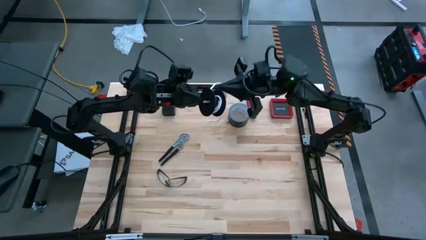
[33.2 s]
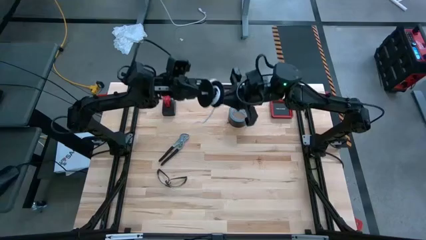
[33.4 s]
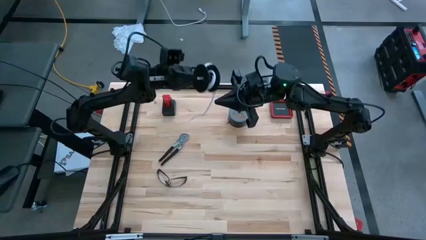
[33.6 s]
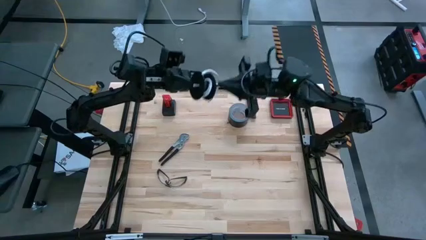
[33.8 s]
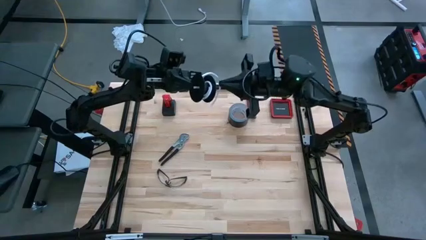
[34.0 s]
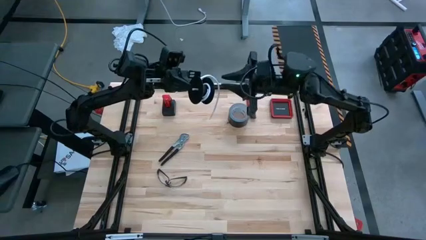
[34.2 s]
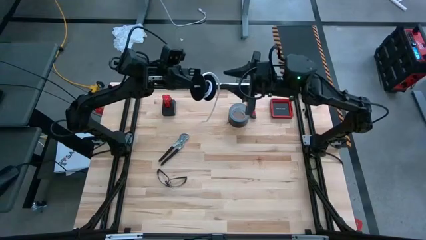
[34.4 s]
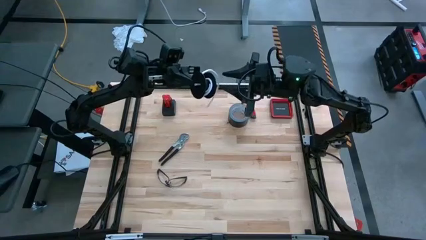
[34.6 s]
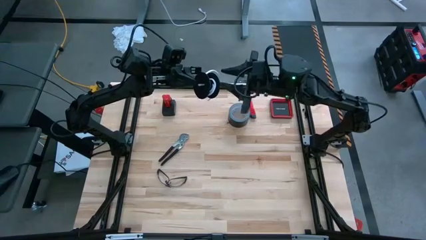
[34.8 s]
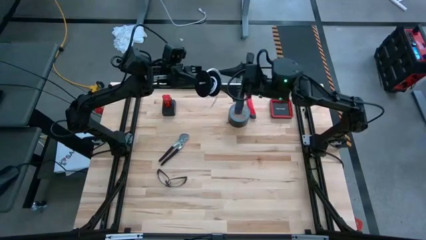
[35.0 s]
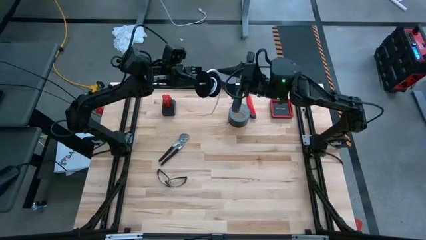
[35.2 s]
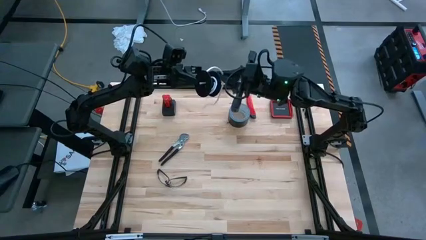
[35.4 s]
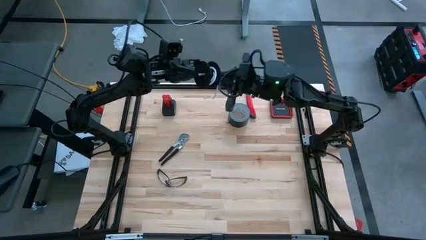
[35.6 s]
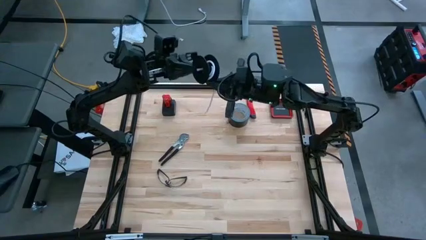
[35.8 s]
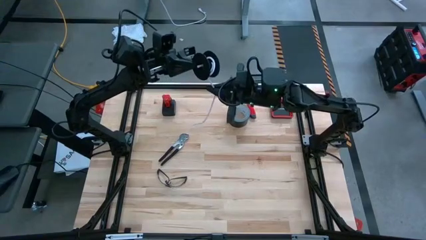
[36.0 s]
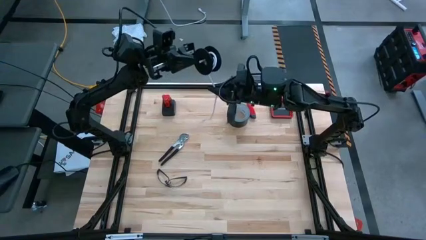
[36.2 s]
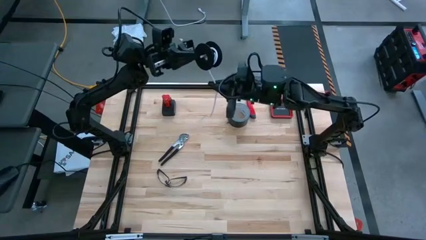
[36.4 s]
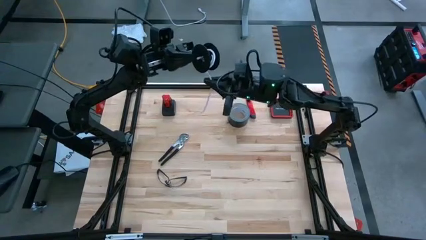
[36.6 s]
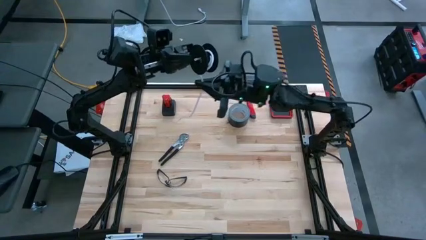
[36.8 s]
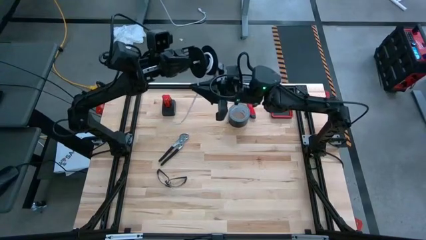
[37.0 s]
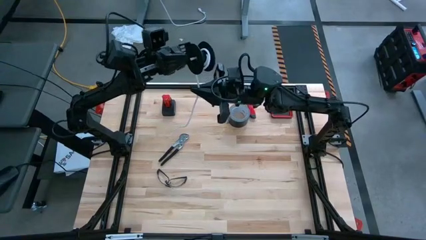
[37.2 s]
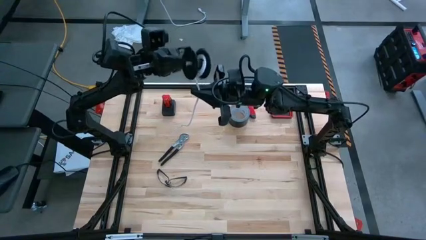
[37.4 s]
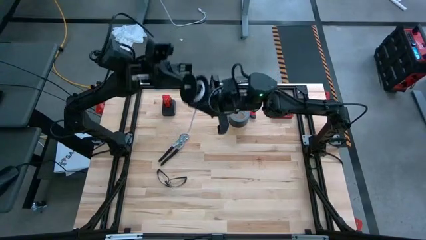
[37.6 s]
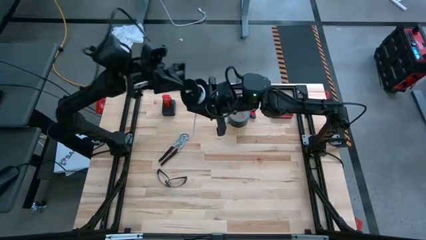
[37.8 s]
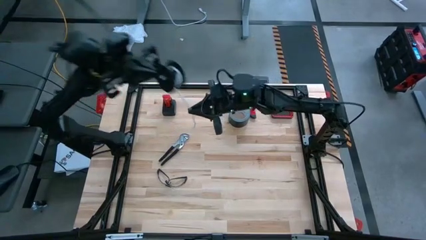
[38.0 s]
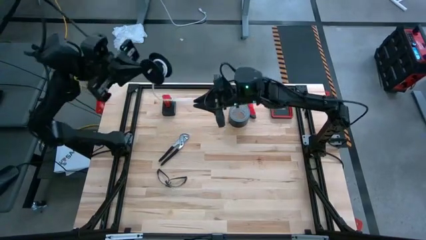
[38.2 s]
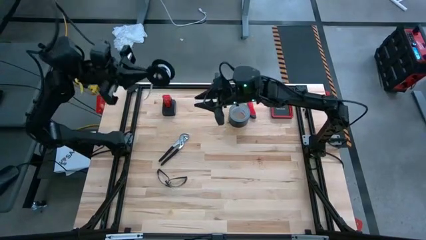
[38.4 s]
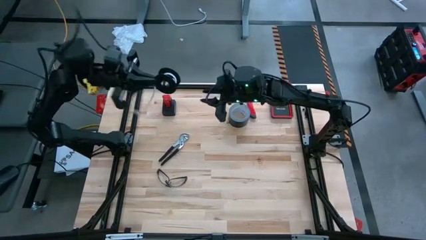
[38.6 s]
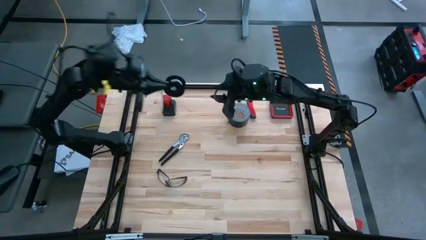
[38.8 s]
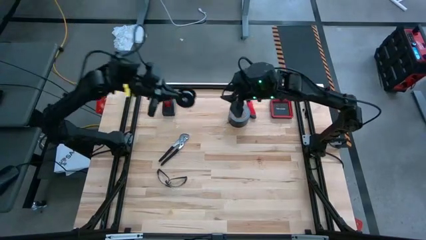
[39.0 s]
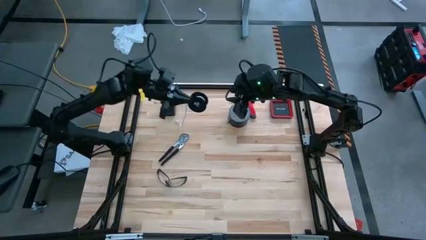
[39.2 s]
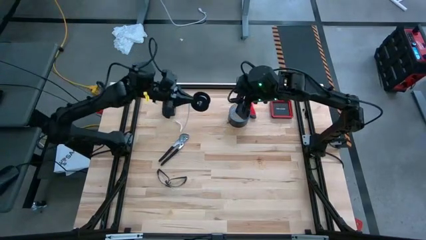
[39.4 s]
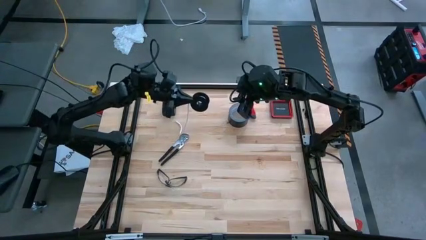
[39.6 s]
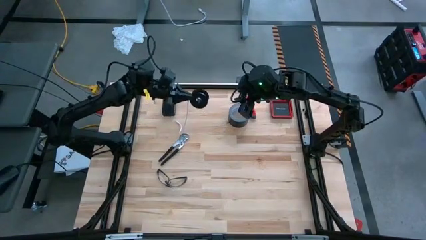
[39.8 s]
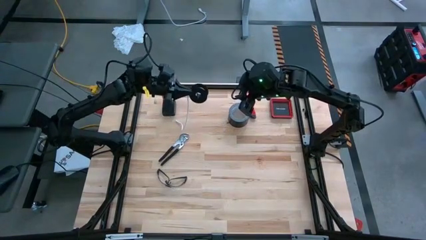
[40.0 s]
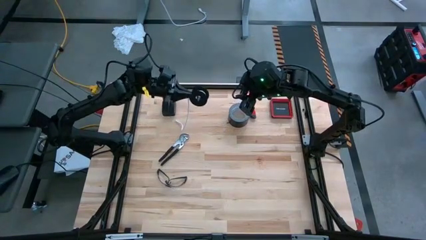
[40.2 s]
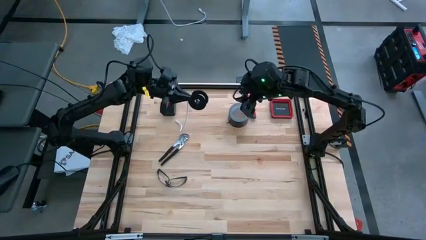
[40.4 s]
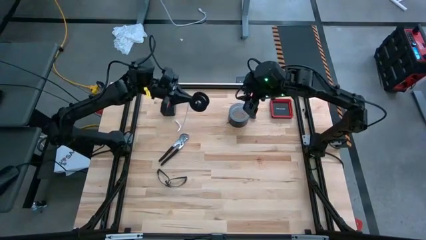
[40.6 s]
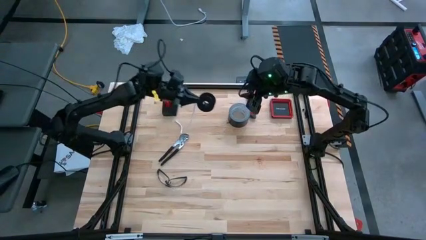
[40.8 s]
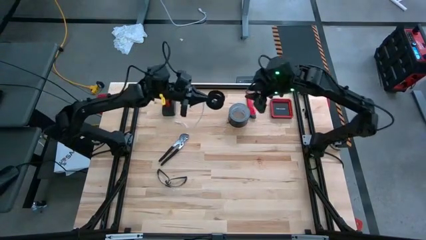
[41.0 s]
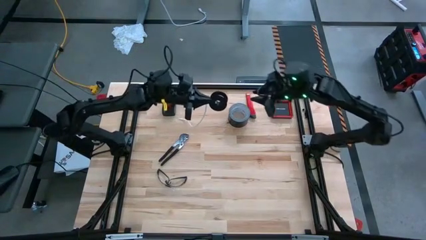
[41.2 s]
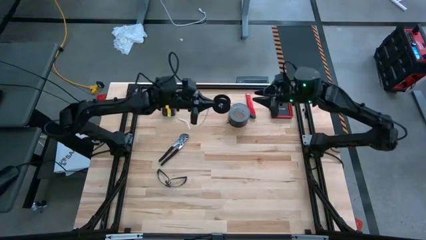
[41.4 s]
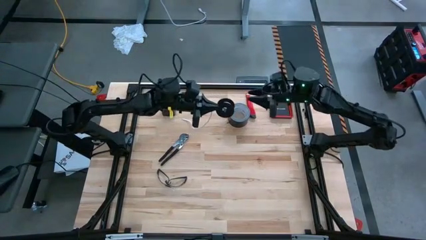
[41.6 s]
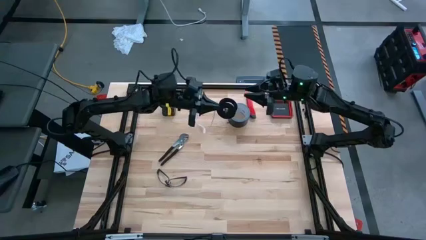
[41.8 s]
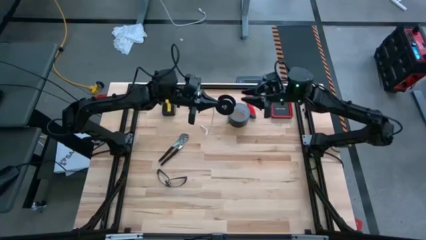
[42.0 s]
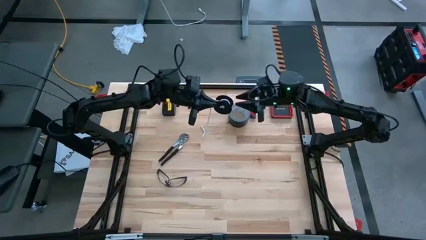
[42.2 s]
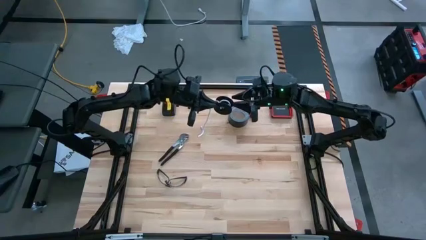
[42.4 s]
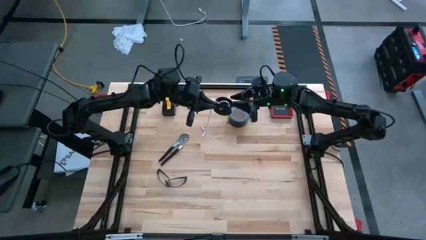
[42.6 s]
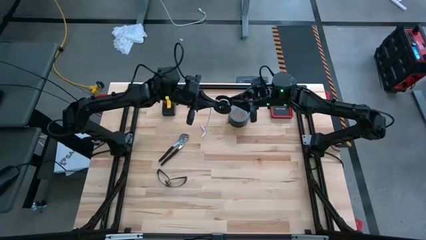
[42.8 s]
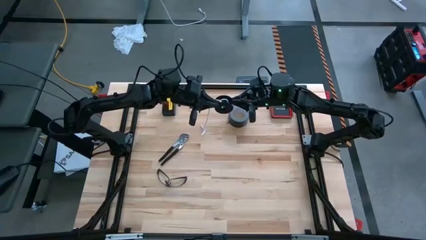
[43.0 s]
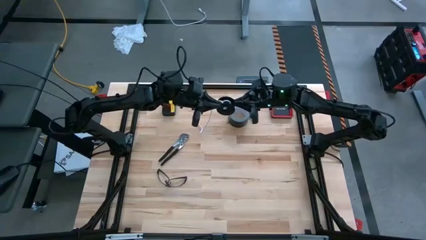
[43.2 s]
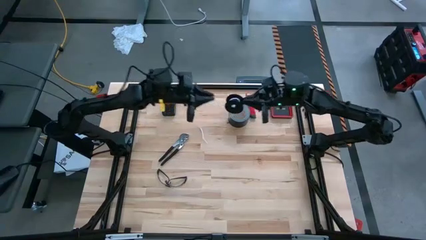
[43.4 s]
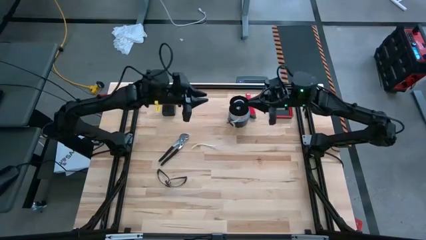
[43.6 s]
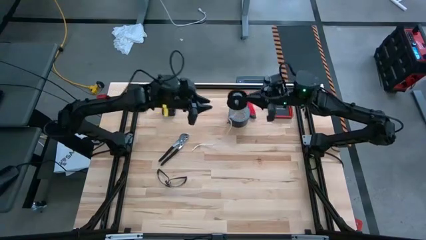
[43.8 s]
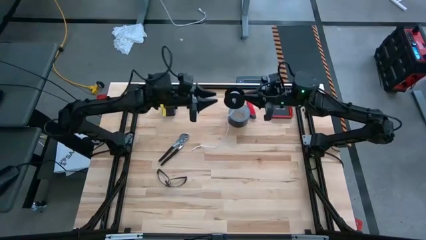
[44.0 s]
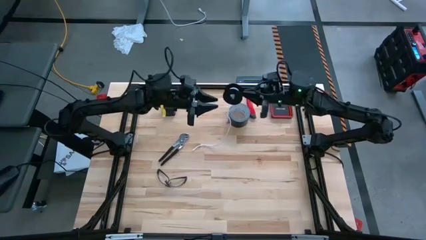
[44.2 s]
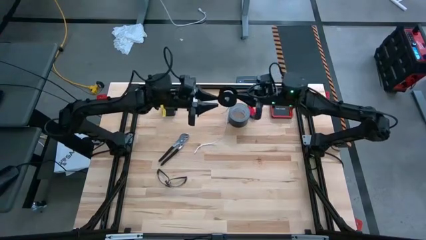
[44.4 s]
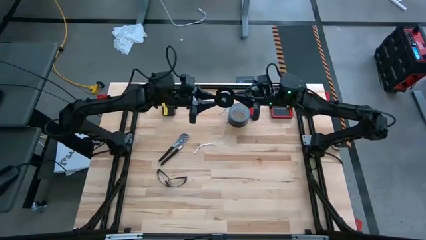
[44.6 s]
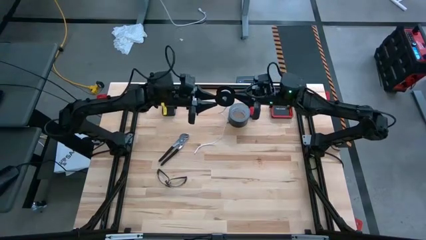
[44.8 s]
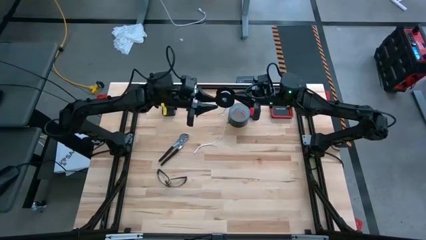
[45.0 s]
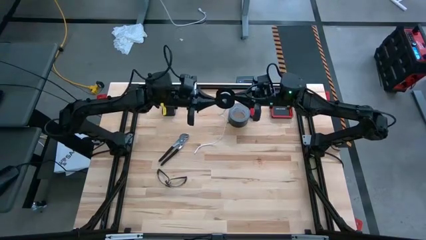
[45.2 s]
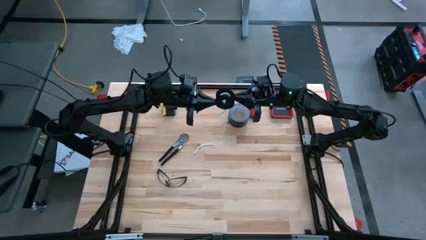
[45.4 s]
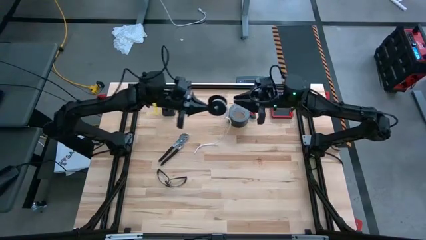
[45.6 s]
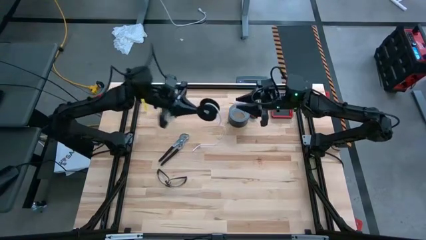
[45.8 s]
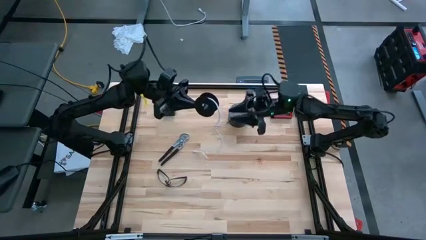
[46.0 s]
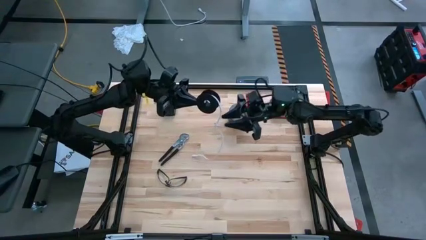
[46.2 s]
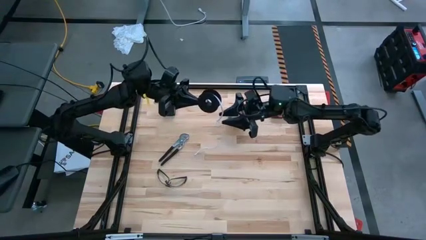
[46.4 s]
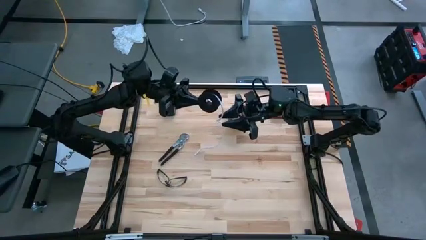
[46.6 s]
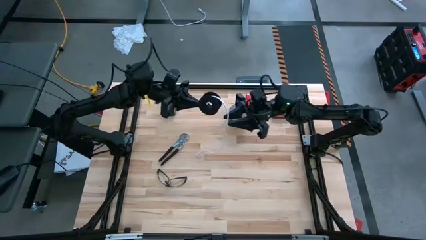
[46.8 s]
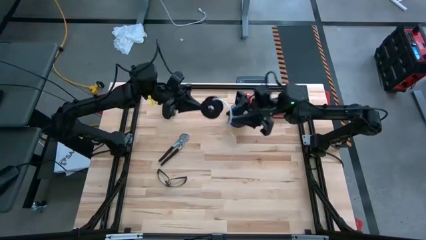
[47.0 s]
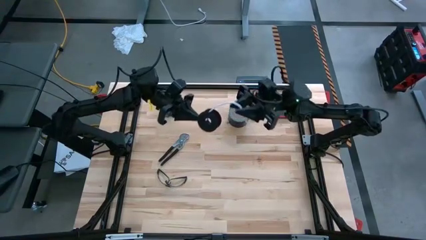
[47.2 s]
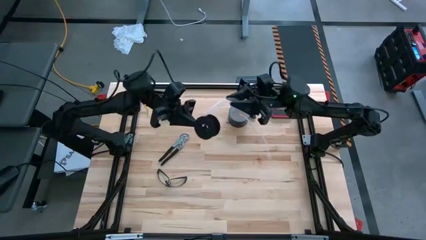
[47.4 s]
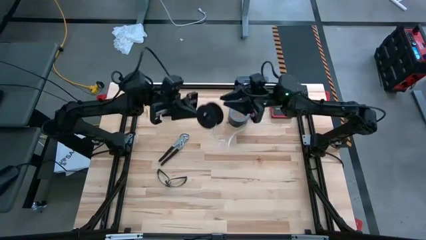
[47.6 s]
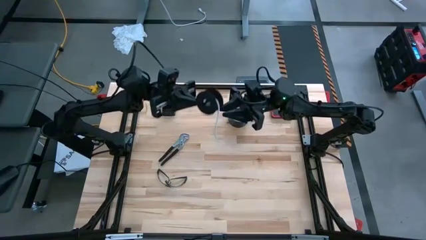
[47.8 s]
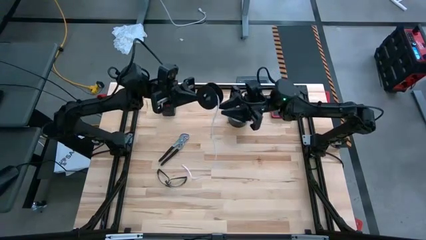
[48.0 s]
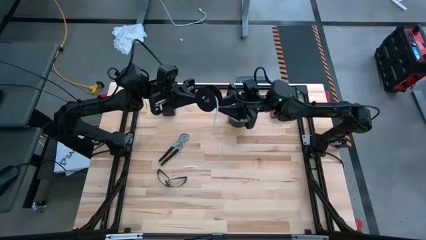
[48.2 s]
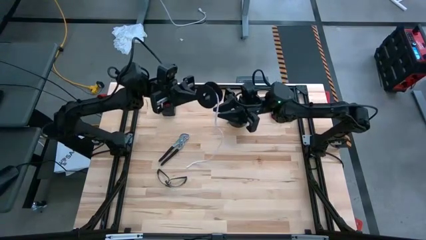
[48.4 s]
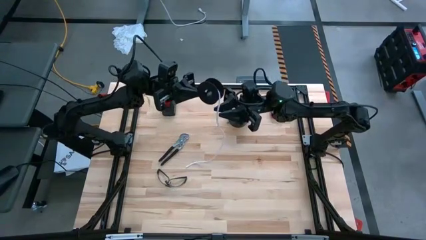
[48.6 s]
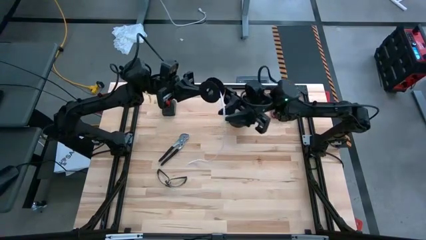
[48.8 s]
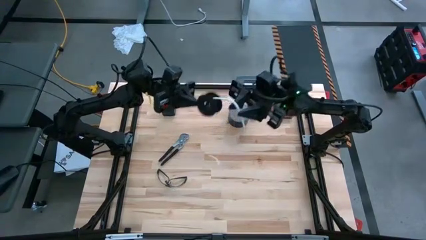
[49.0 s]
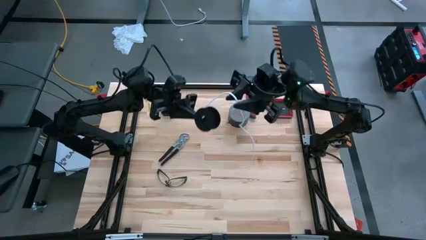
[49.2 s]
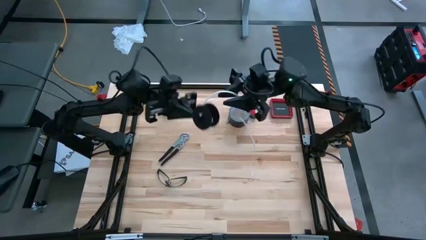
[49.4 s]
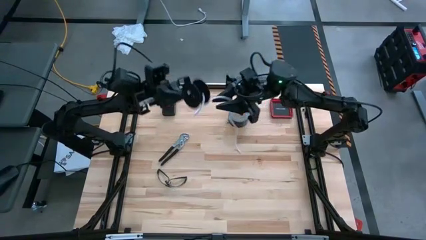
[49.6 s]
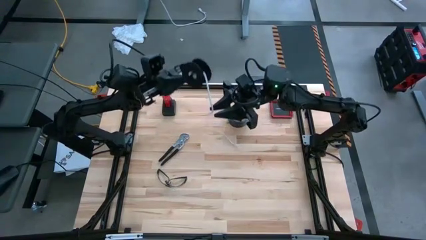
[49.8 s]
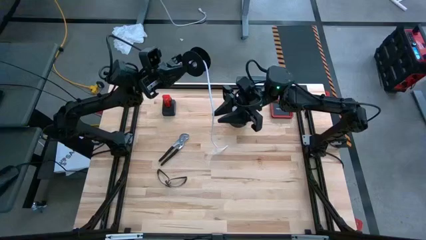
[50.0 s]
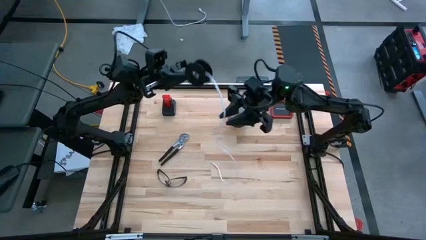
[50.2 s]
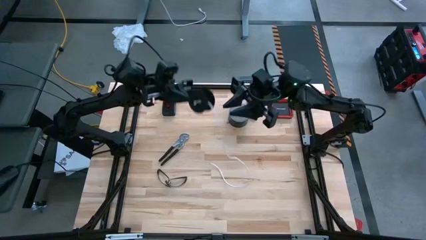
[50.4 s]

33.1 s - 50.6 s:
Task: Coil cords
Uncoil the white wire from the black spool
